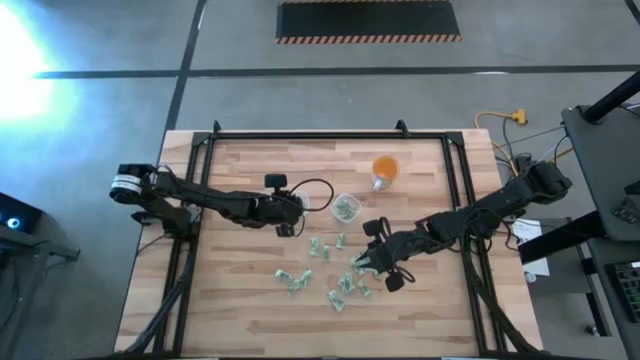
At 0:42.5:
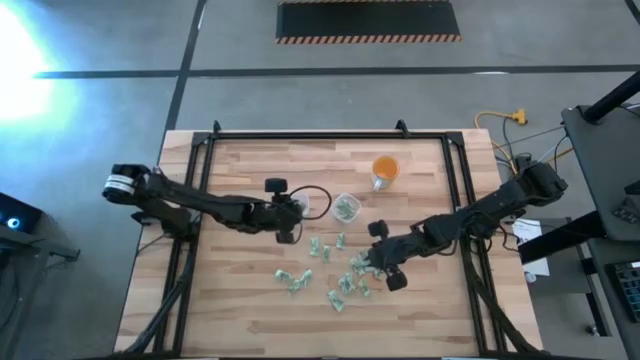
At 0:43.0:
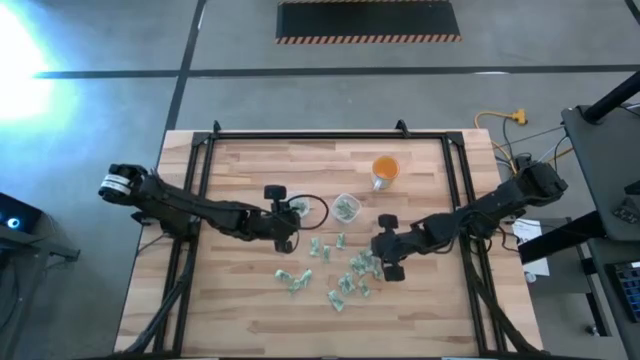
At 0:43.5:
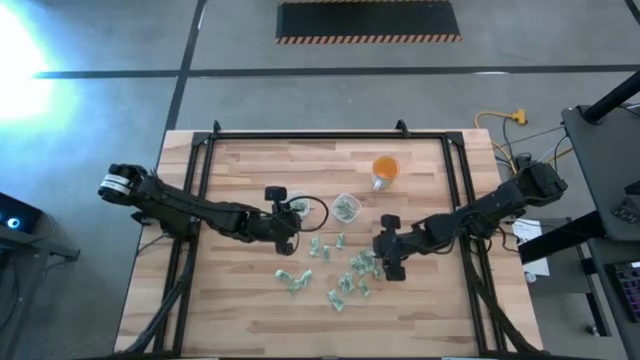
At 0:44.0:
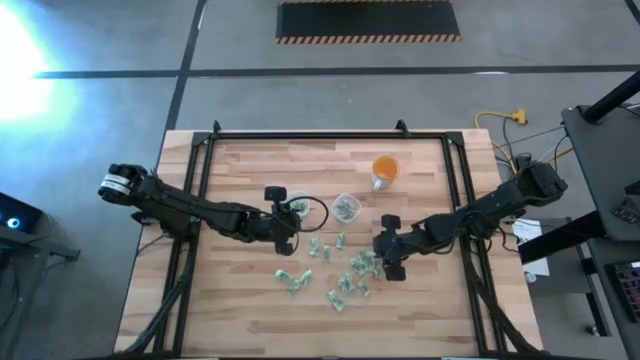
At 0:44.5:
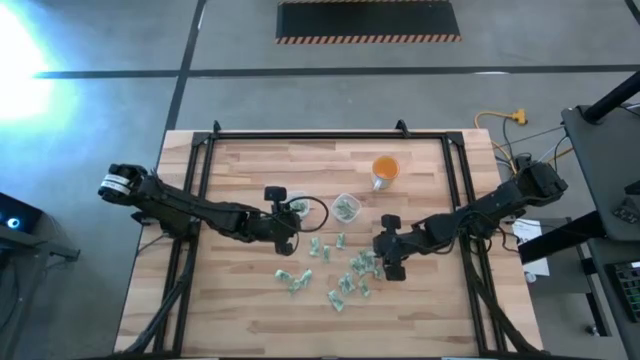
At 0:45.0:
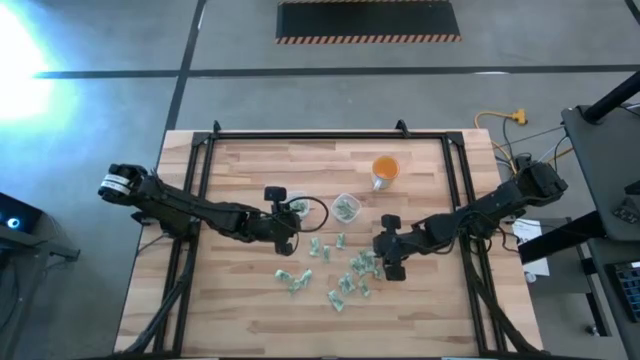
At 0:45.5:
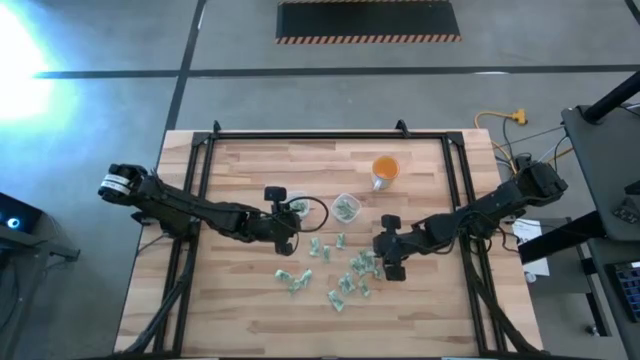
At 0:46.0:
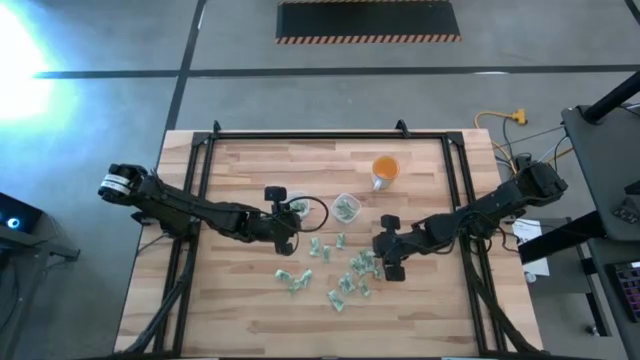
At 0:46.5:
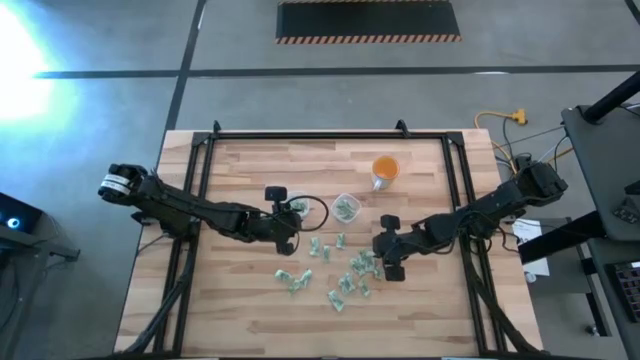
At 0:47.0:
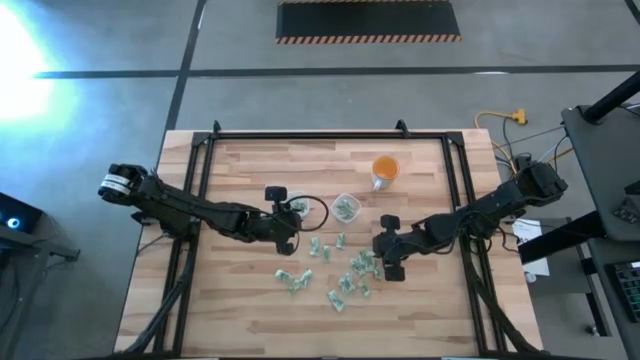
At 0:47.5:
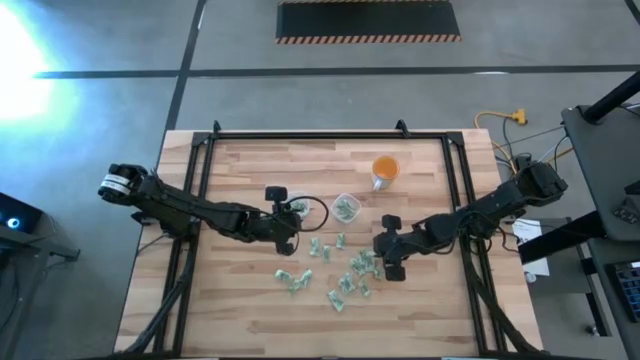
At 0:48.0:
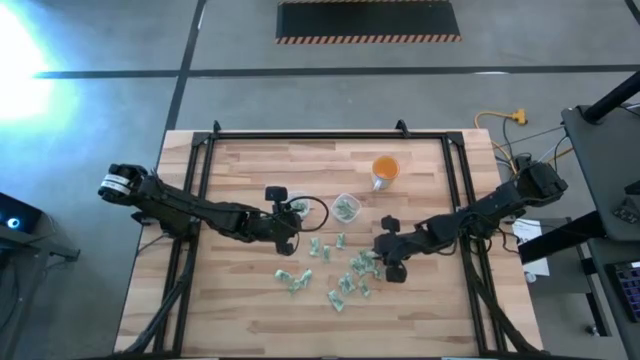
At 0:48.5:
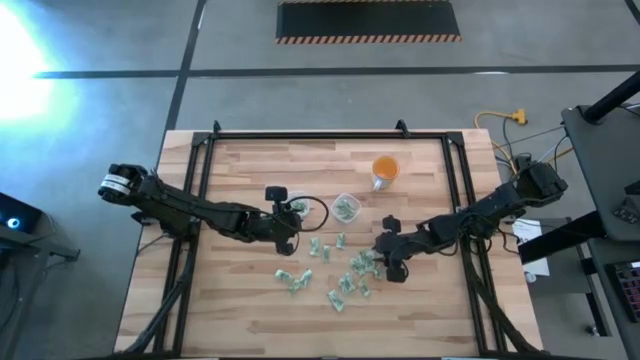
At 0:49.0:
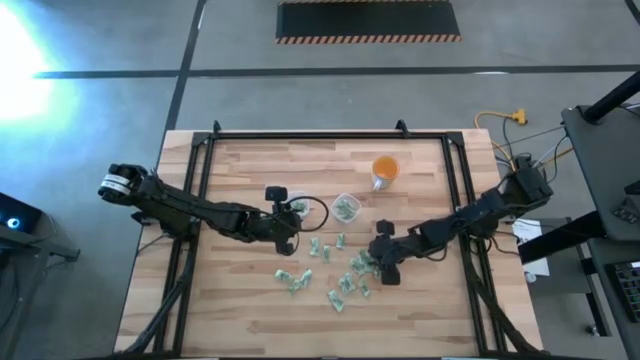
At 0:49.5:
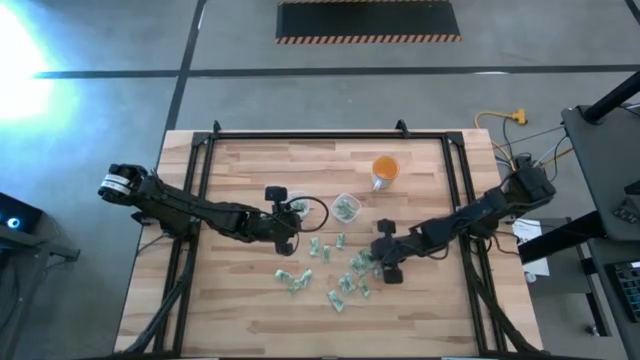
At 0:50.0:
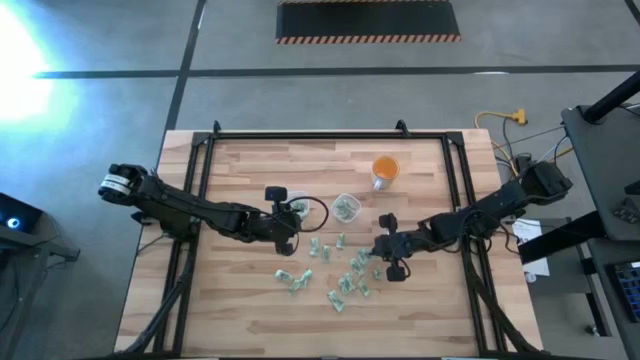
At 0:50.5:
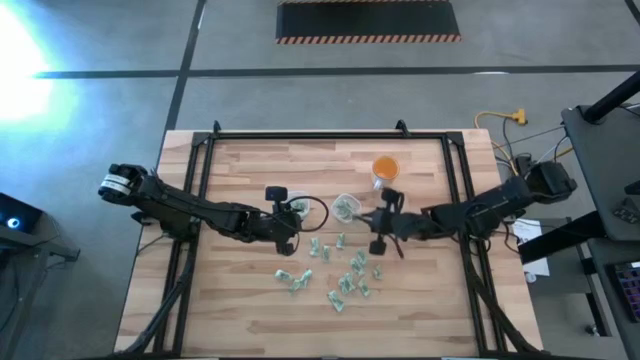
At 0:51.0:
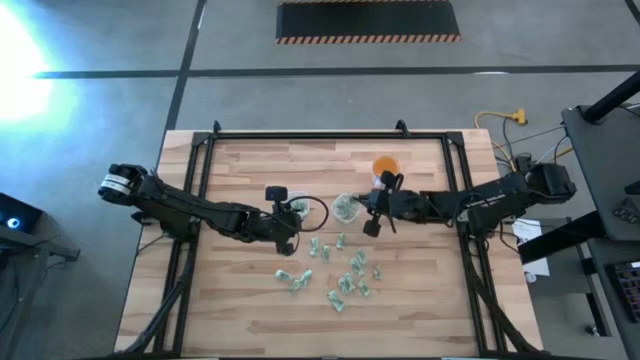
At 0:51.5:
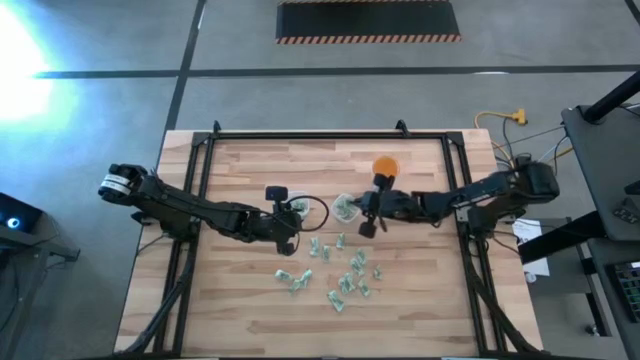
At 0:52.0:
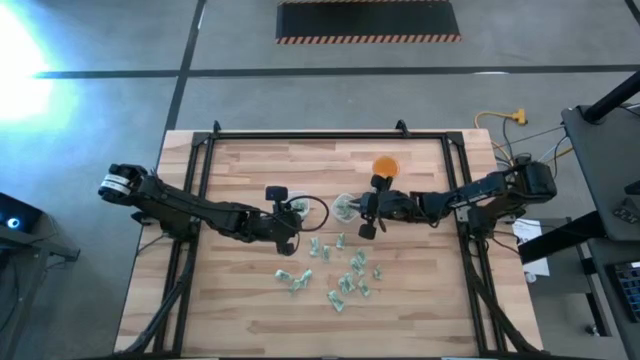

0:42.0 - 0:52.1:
Task: Pick and place items into bin
Put the white stevia packet into the right transparent bin

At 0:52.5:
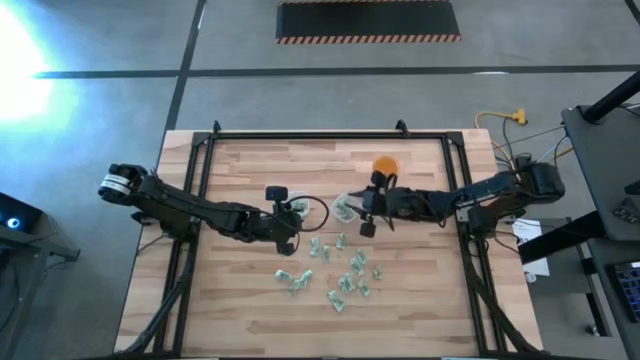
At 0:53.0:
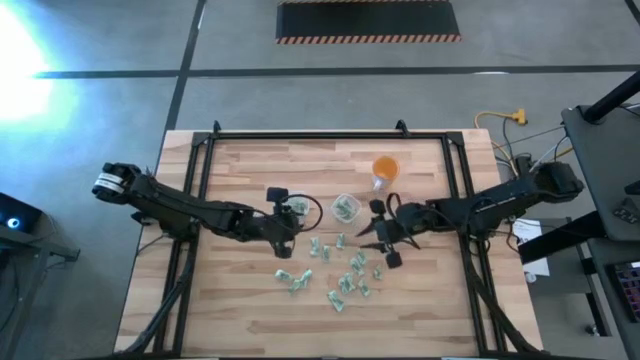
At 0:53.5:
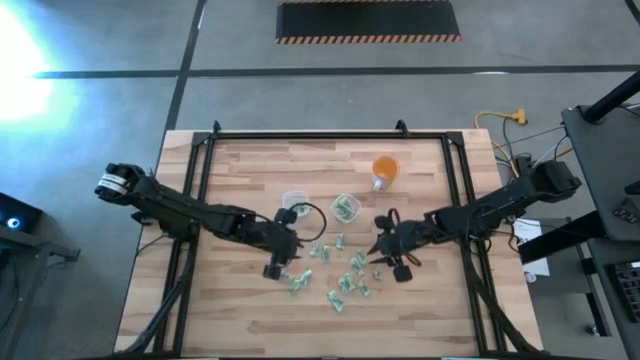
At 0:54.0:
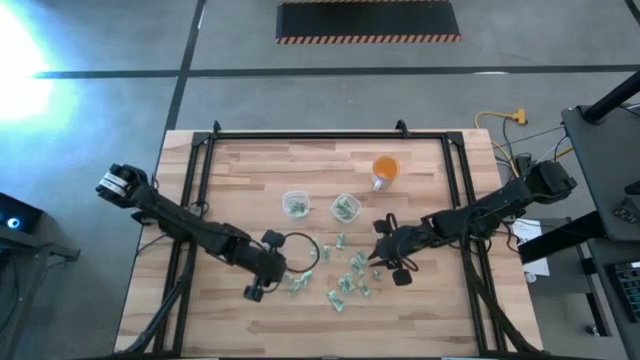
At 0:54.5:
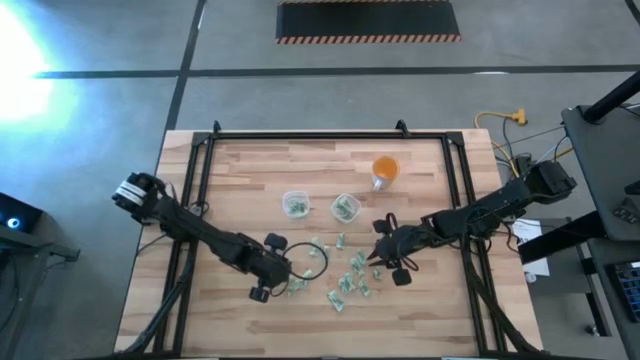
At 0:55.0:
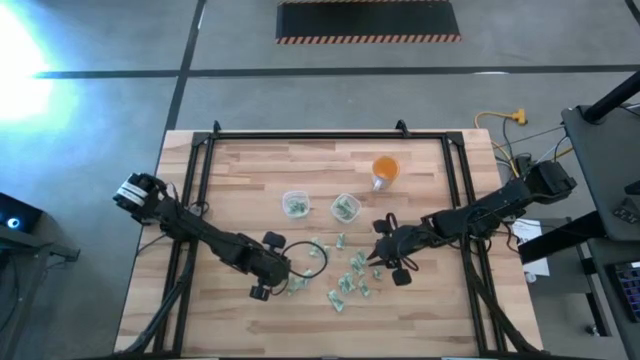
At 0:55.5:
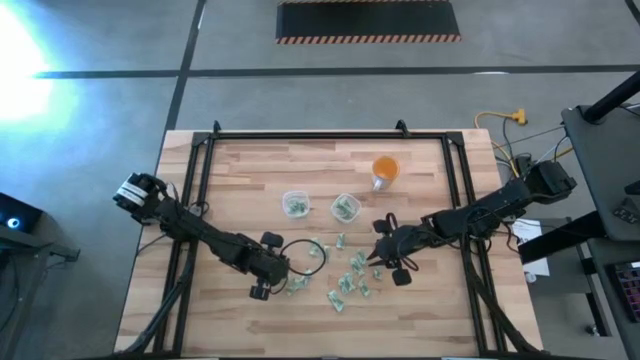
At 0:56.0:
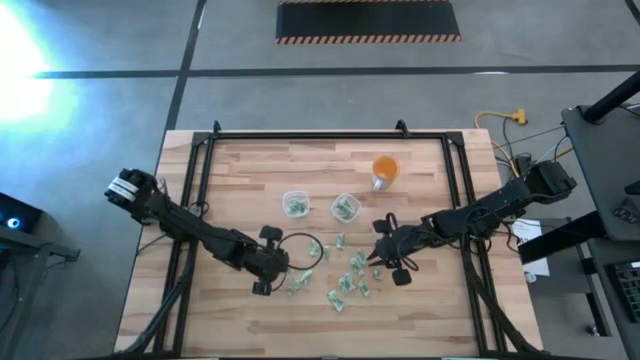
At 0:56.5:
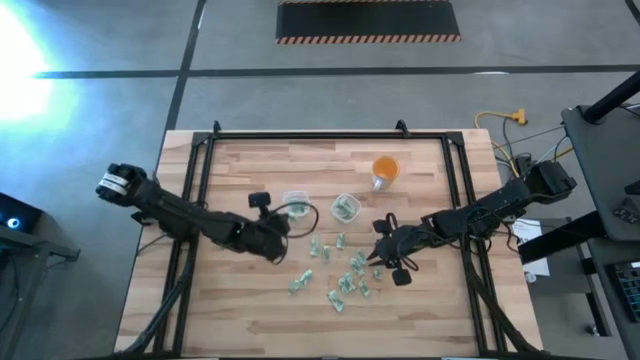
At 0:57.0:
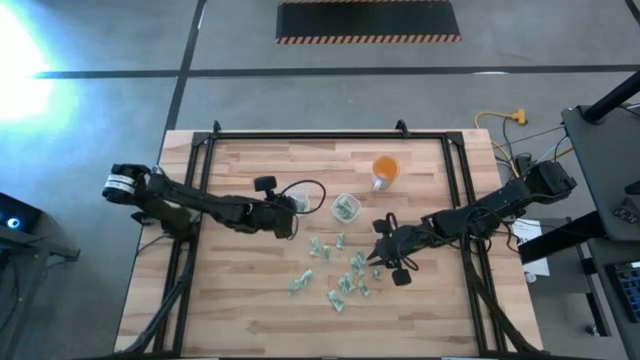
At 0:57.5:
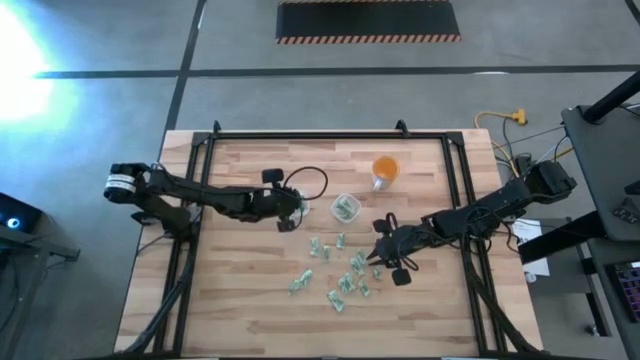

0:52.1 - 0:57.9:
Put the white stevia packet into the left transparent bin

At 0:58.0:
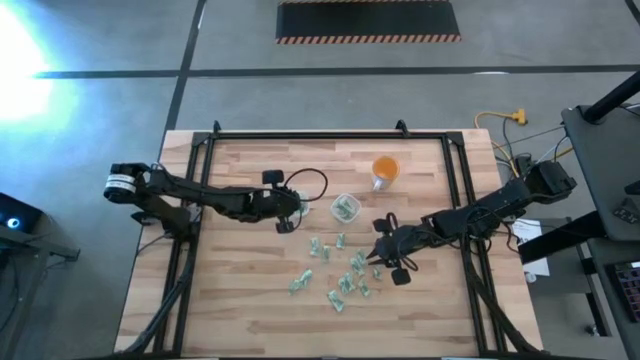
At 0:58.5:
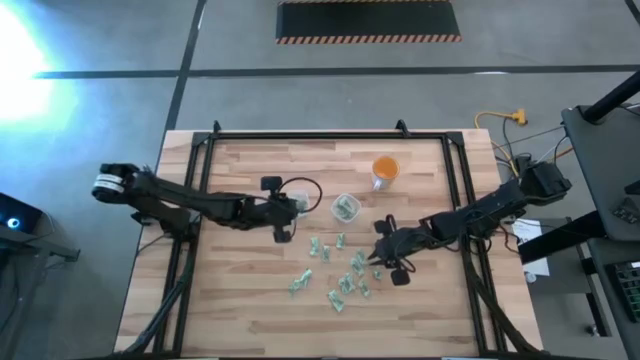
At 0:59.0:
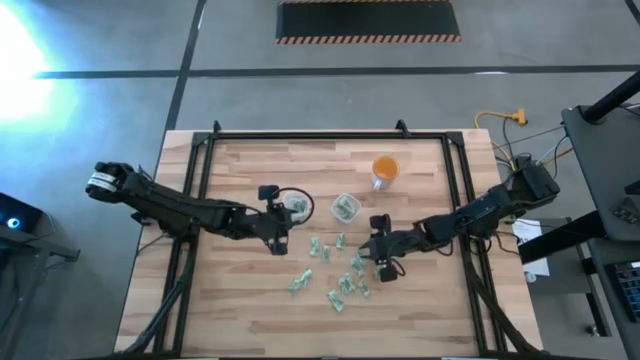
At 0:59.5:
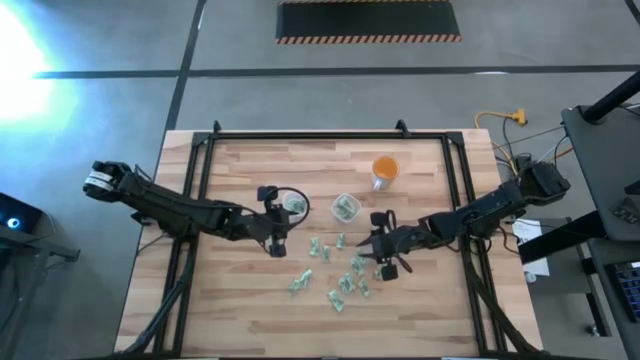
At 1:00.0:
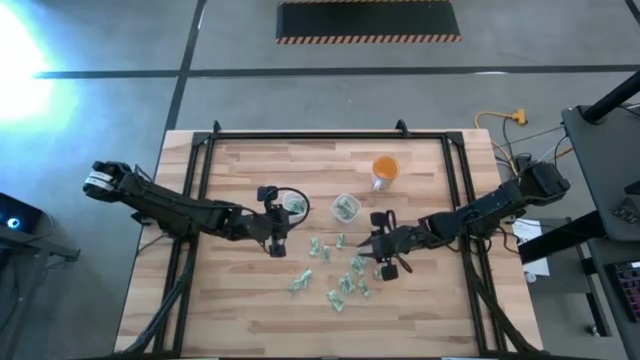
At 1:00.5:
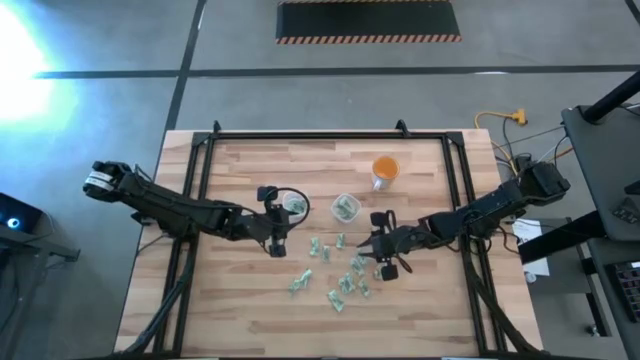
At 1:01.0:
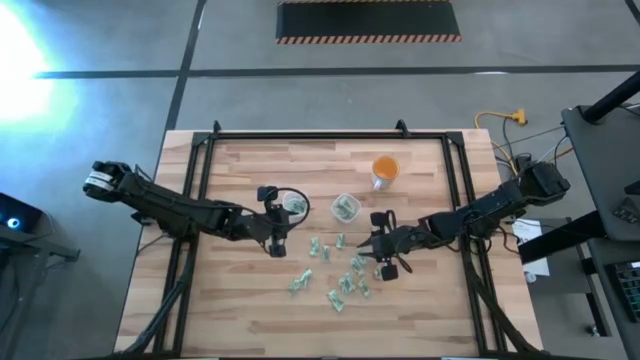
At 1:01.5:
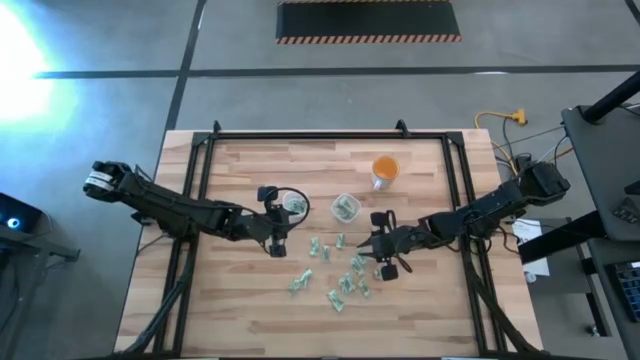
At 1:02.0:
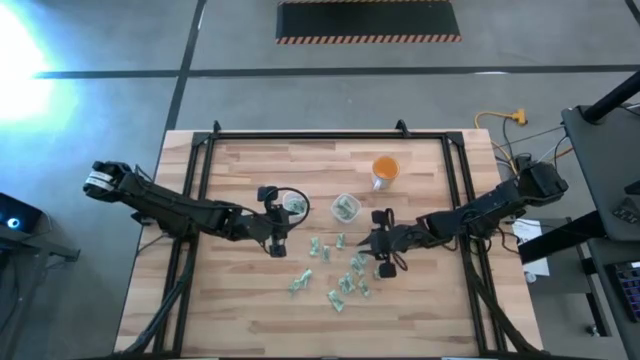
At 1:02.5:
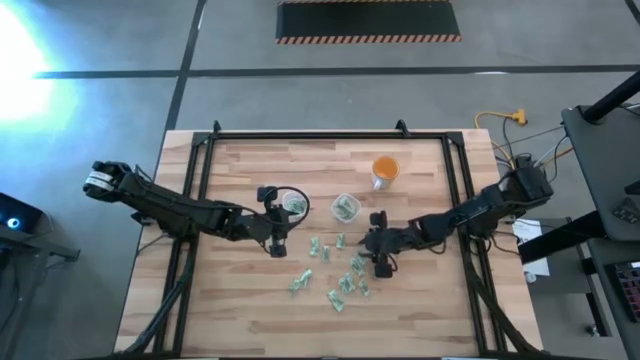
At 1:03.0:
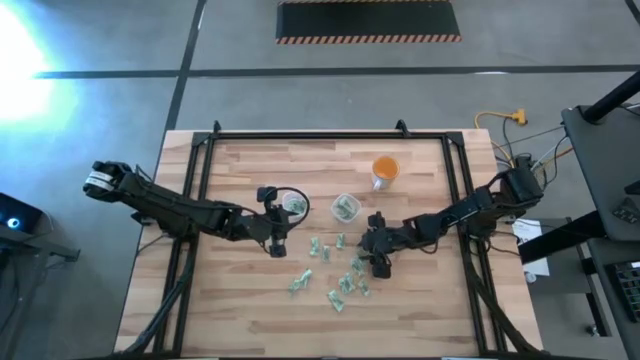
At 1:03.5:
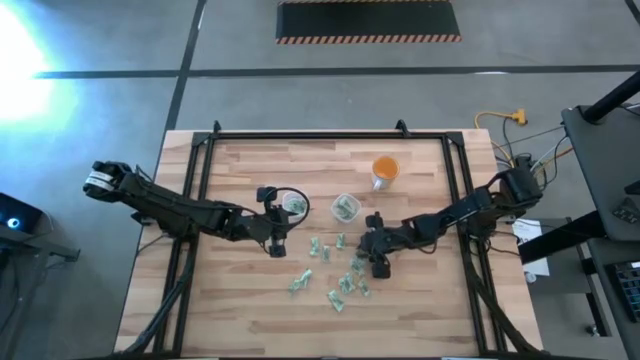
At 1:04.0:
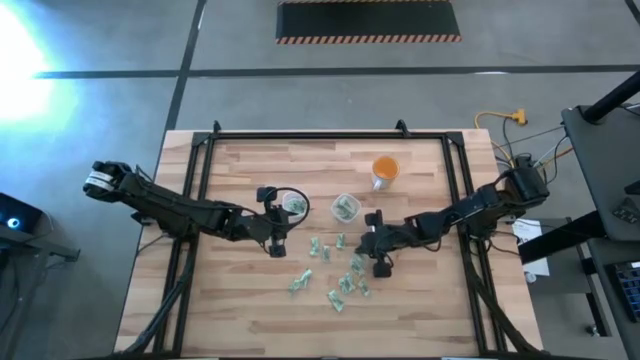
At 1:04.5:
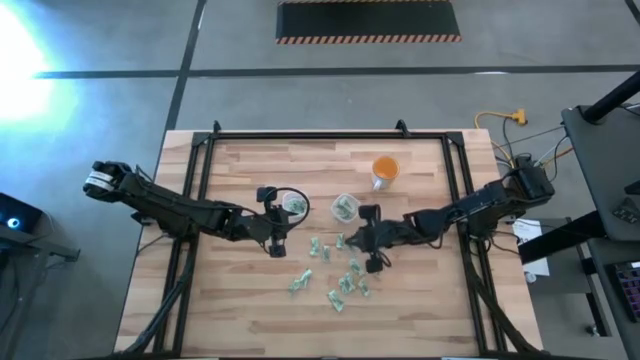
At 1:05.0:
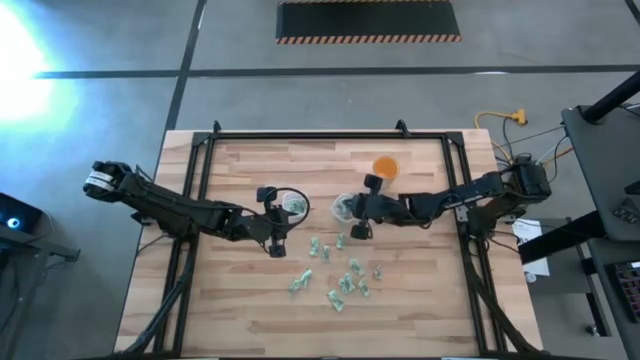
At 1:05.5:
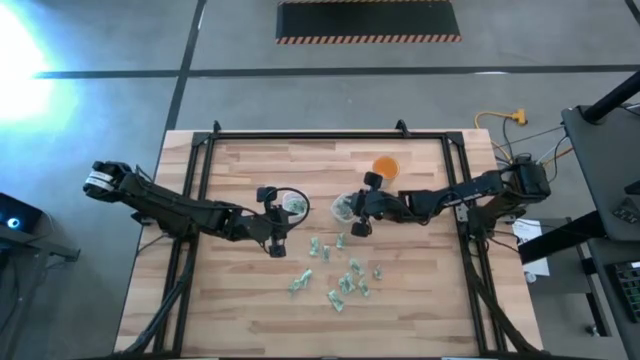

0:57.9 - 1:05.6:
Put the white stevia packet into the right transparent bin
